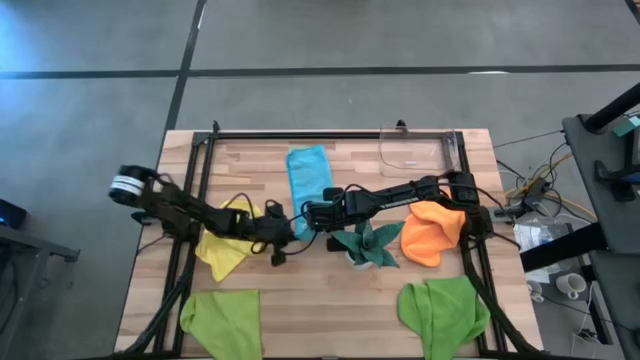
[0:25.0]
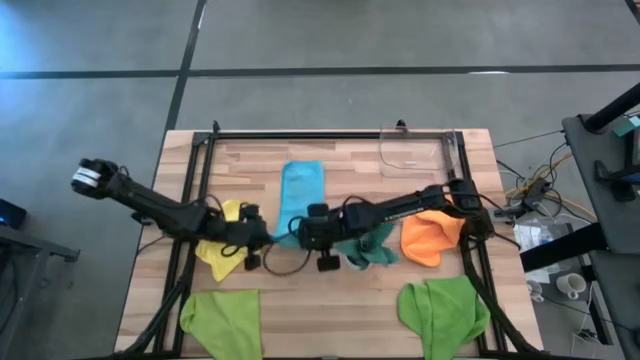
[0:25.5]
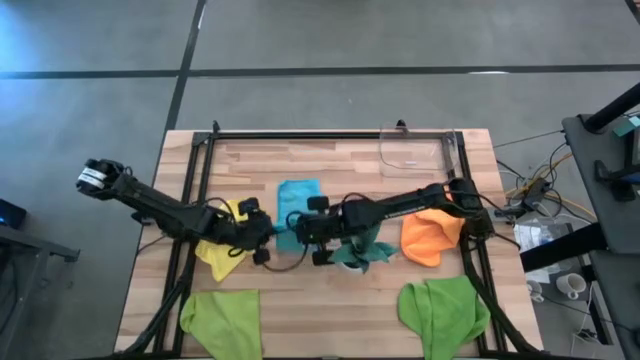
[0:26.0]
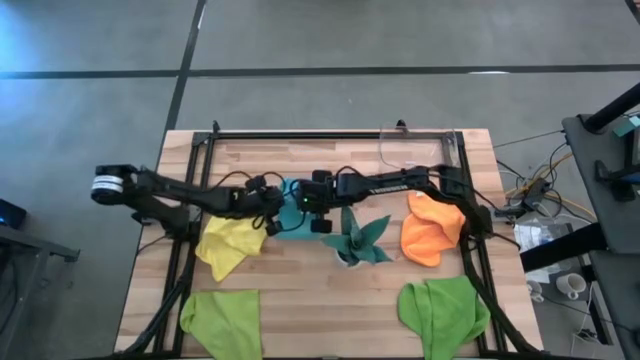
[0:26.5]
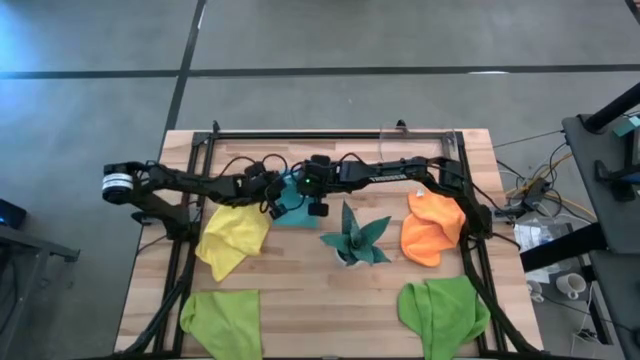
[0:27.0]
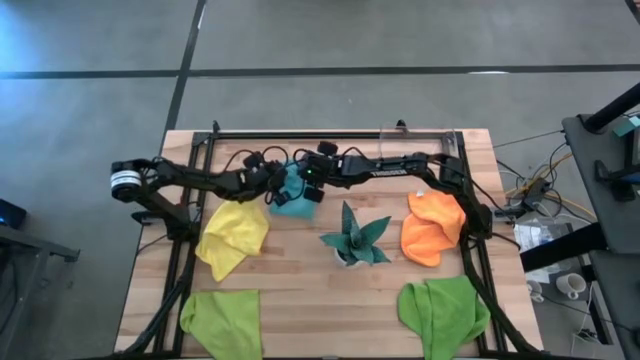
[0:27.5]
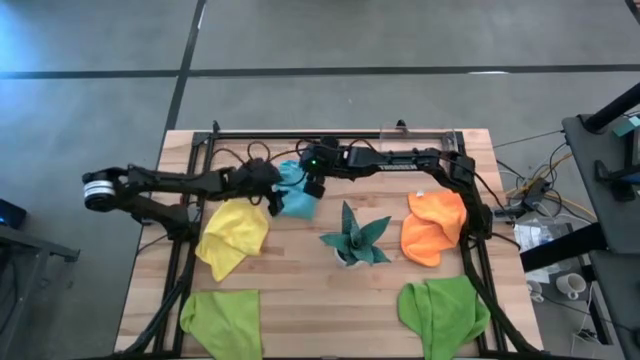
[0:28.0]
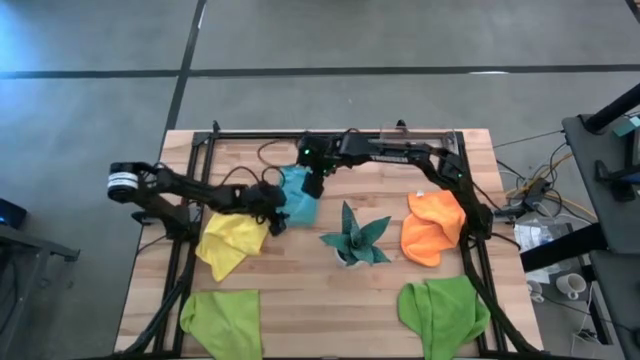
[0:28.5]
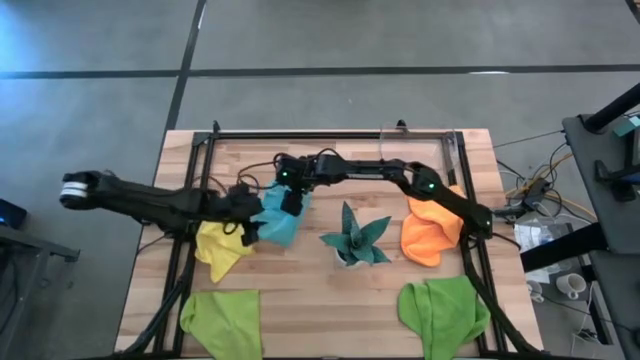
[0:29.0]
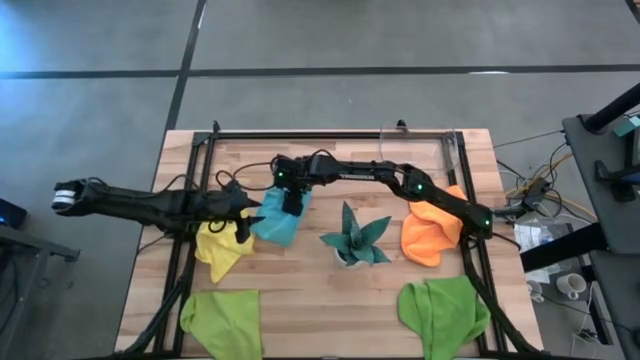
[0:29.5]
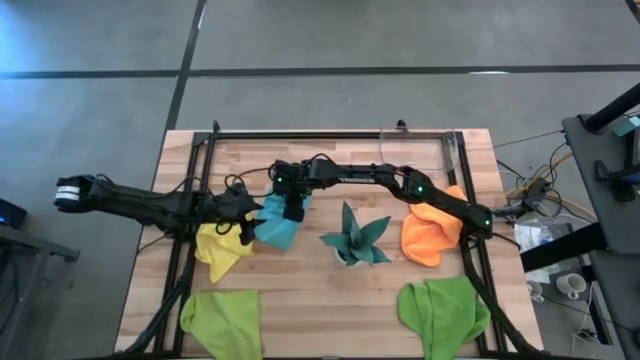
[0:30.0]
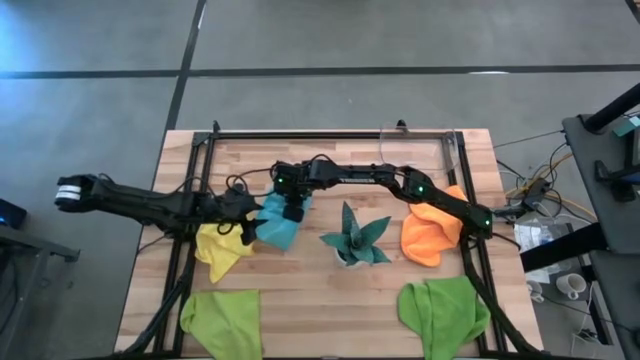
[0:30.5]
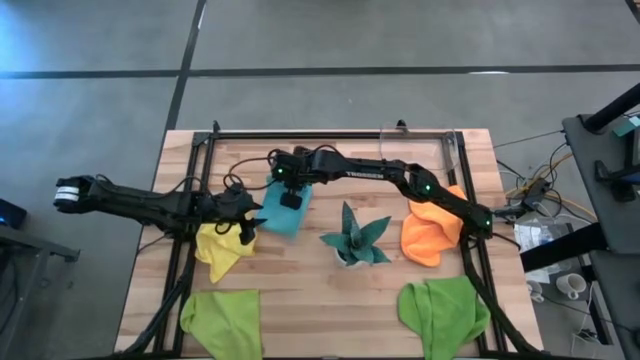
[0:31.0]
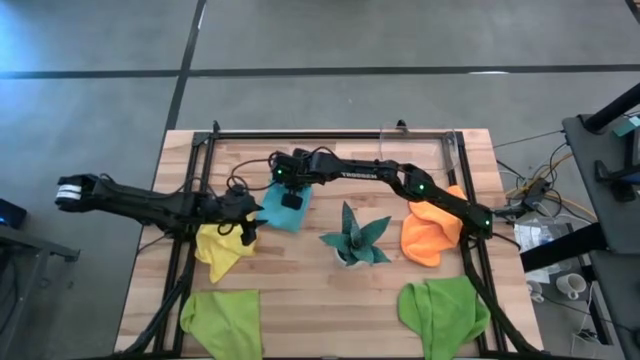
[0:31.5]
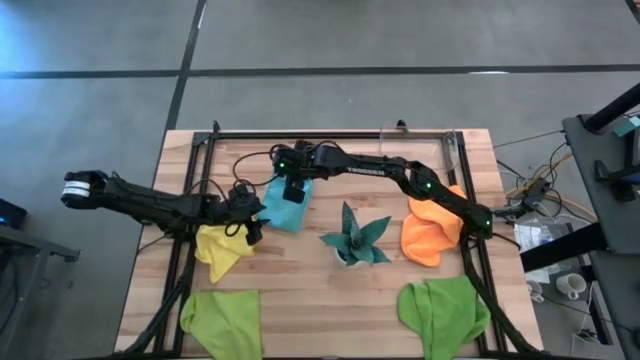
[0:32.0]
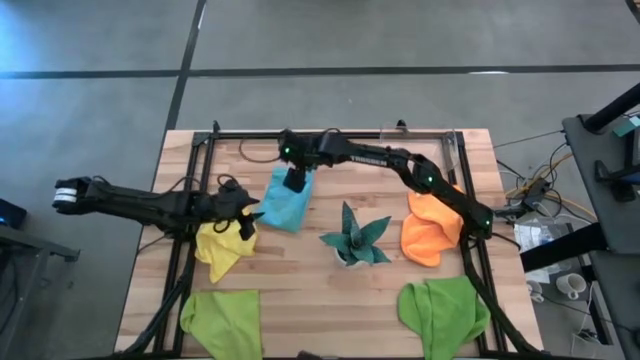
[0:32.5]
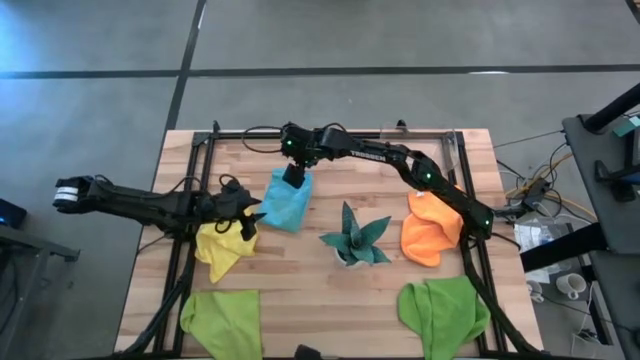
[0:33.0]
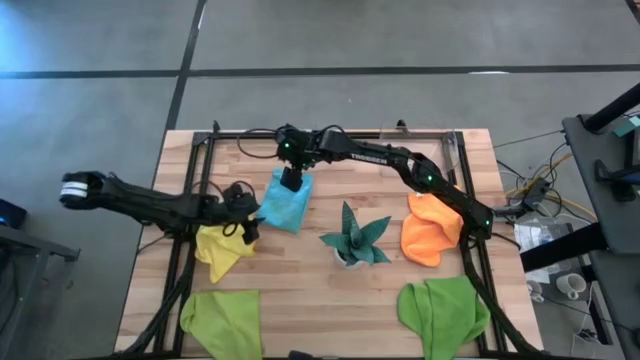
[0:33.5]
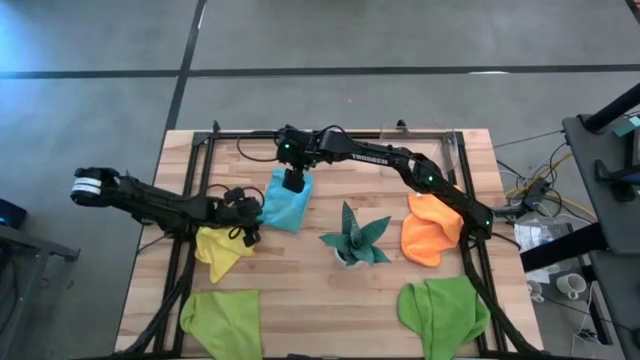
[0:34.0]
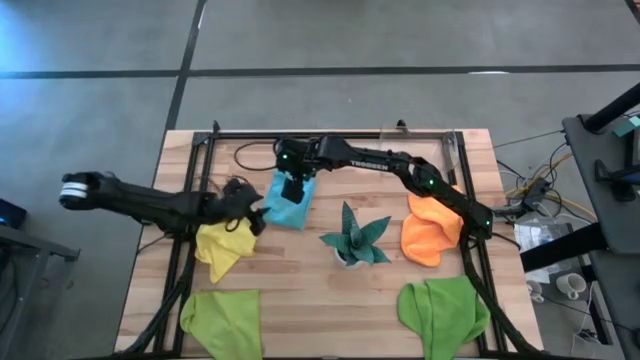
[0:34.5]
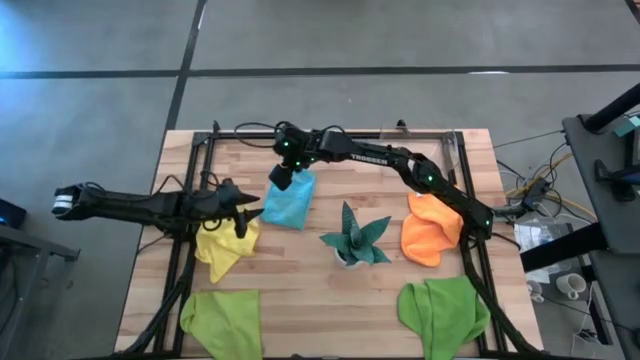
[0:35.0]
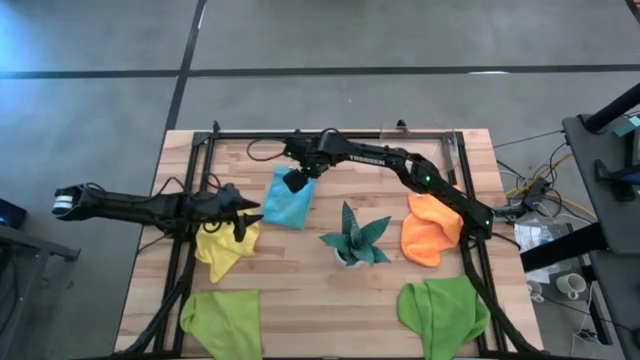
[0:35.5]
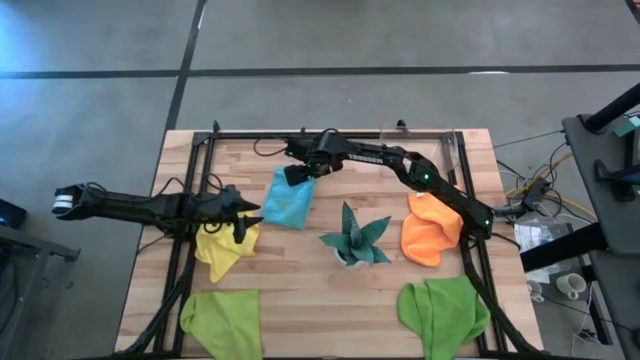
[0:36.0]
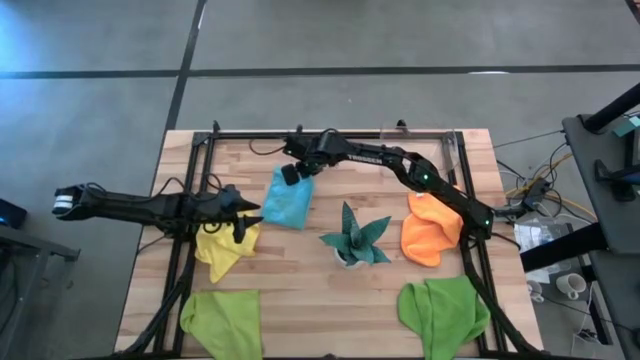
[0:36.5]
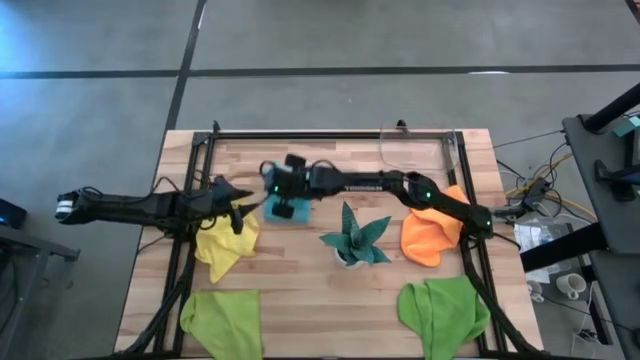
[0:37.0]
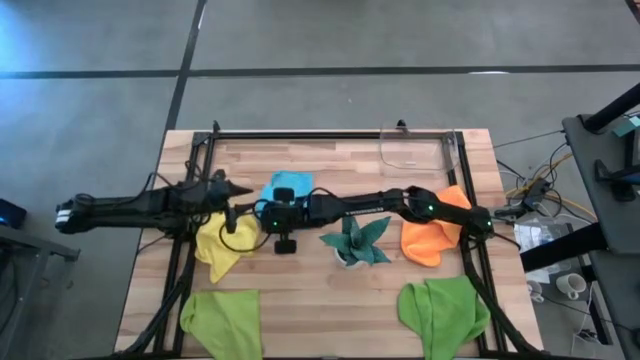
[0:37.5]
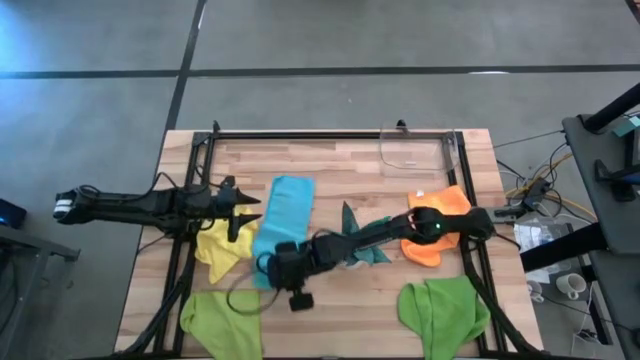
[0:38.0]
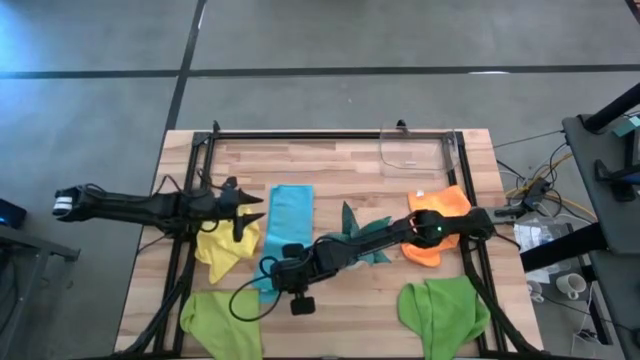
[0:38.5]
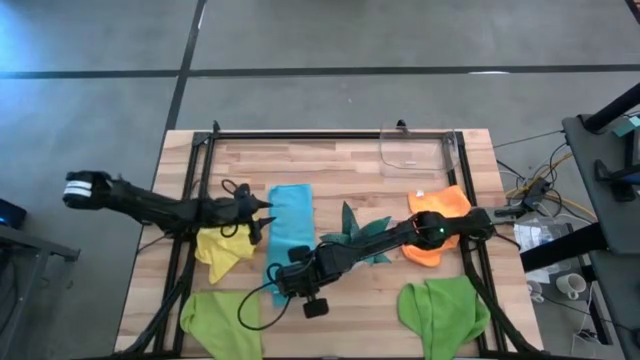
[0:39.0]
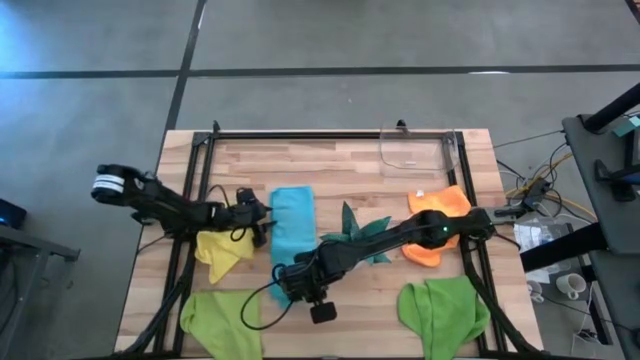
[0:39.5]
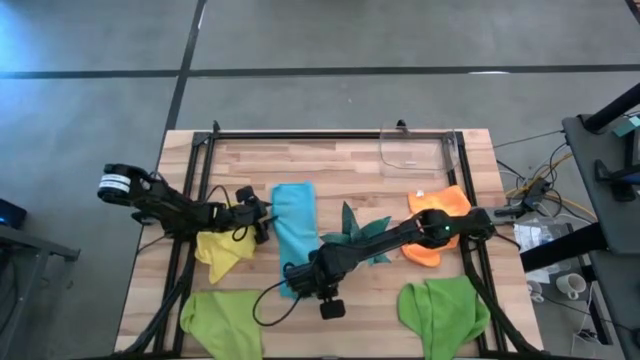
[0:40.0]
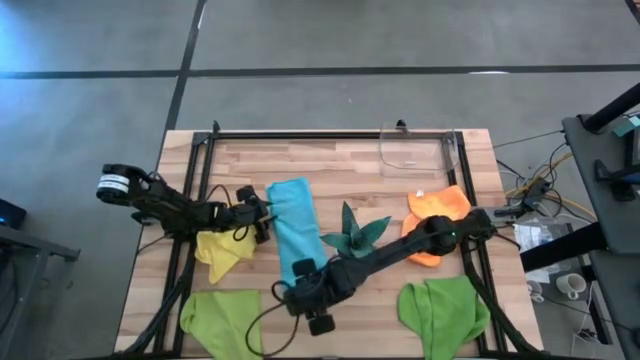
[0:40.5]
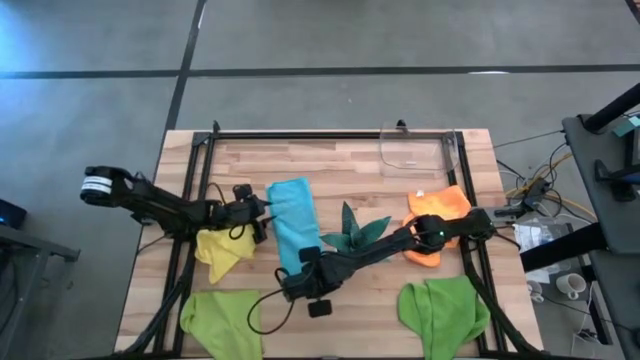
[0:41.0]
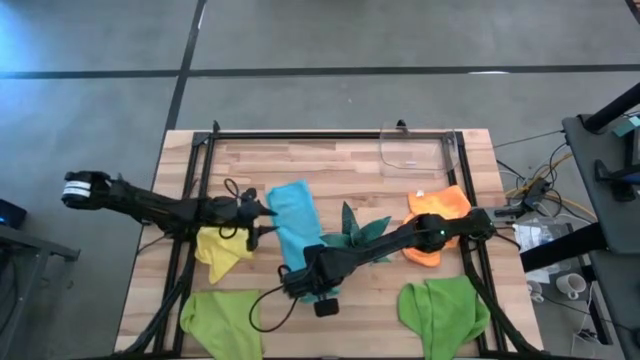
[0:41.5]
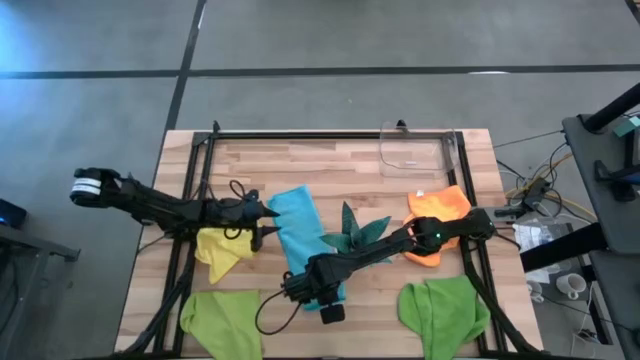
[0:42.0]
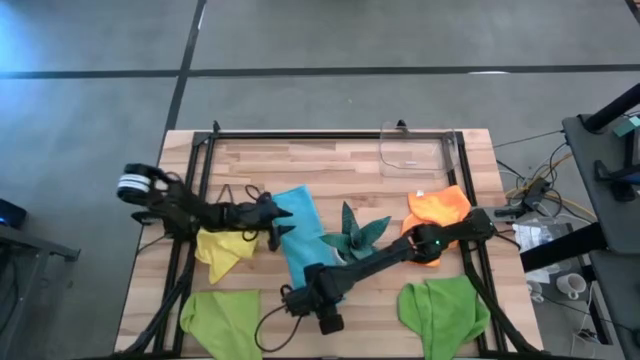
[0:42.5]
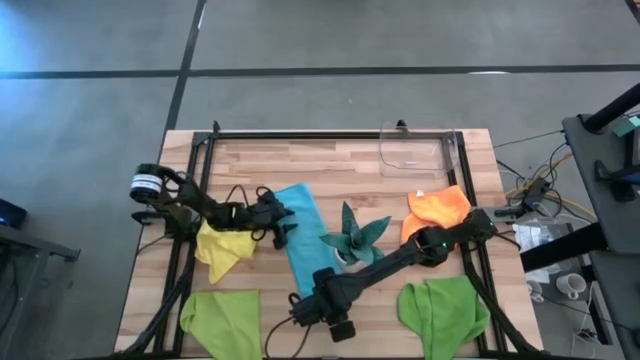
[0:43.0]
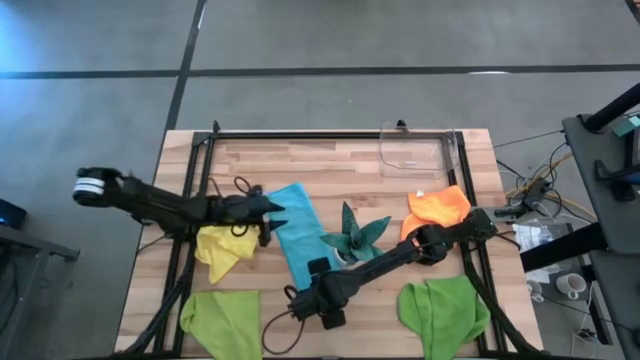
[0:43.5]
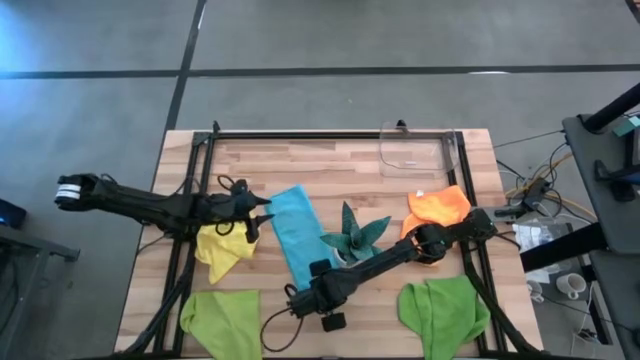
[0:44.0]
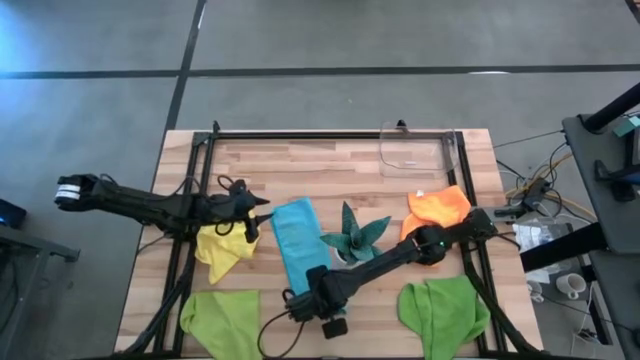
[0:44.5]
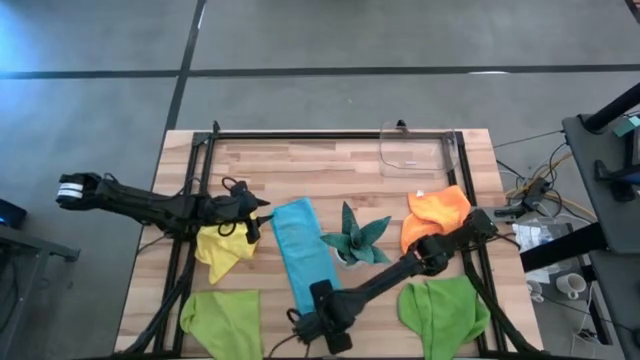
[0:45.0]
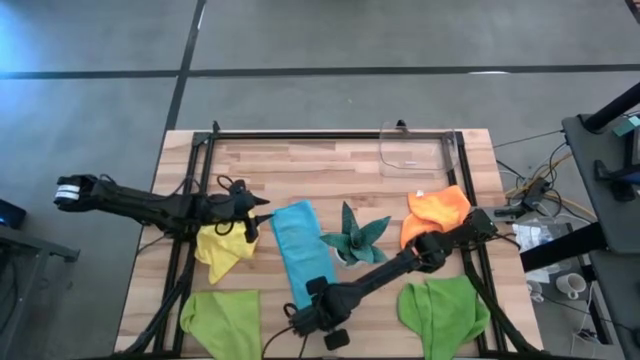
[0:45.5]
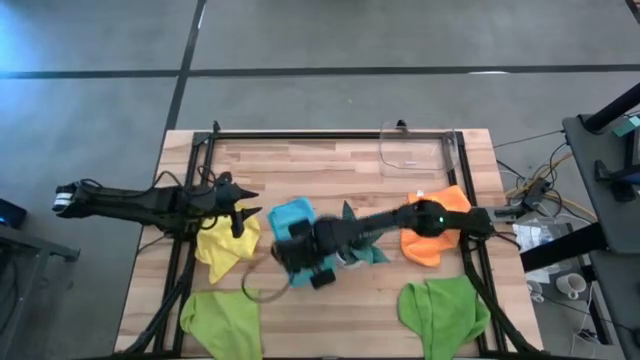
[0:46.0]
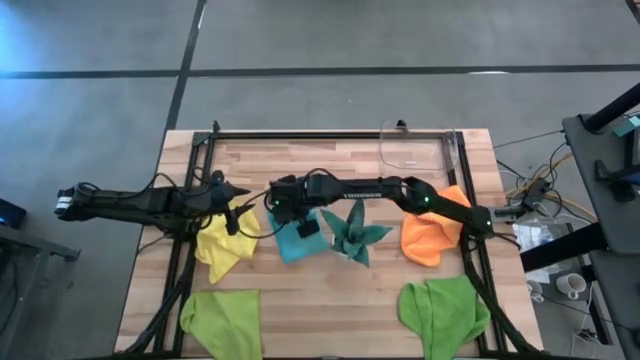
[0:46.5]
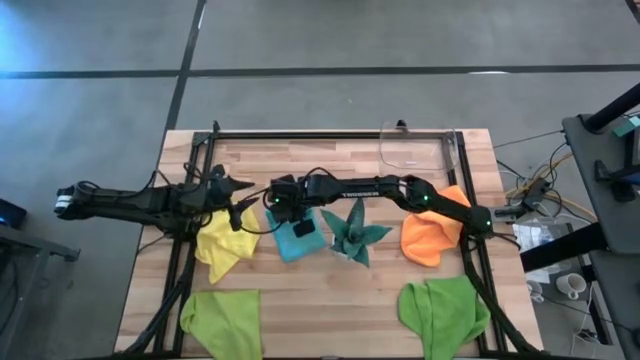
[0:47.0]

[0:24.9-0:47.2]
Task: Fold microfiber towels
Fold the blue microfiber cloth
